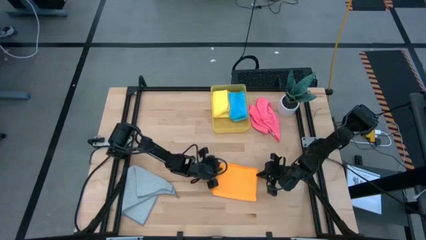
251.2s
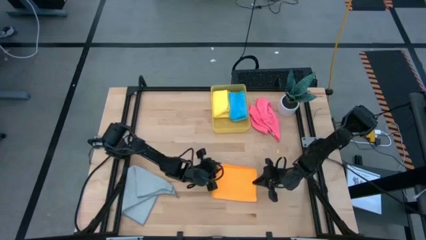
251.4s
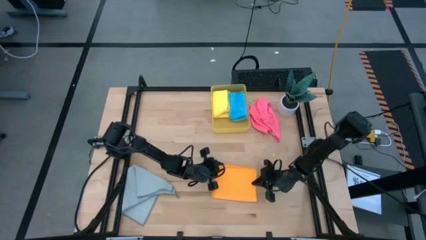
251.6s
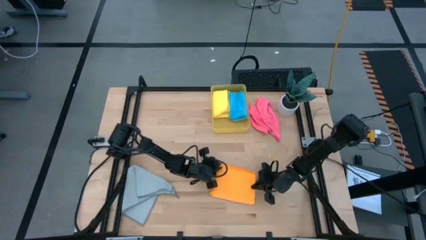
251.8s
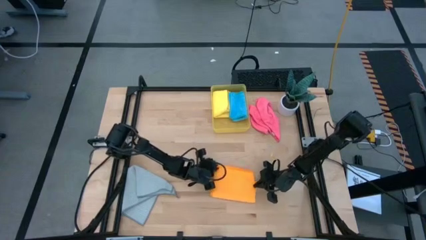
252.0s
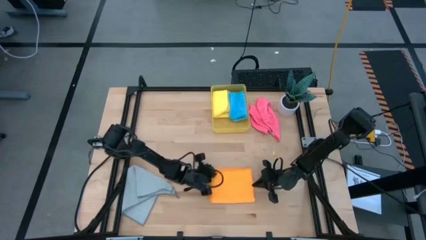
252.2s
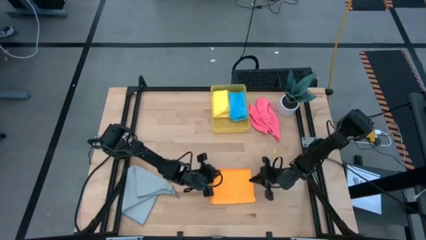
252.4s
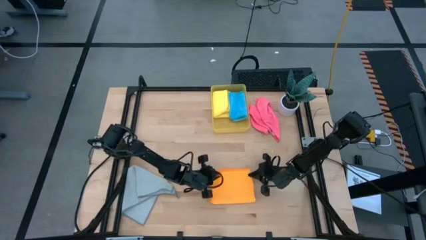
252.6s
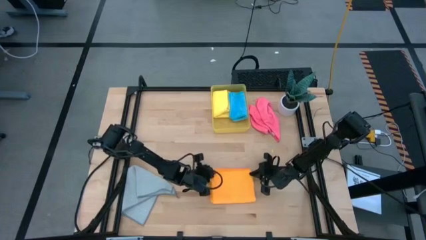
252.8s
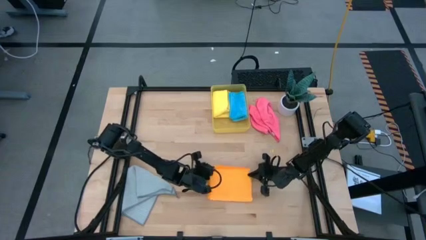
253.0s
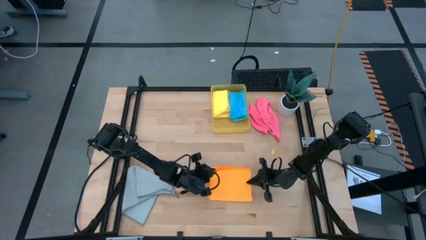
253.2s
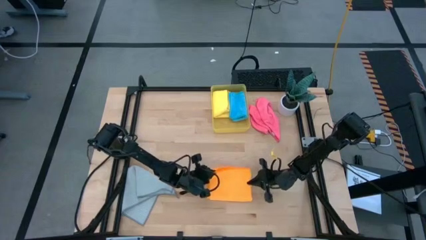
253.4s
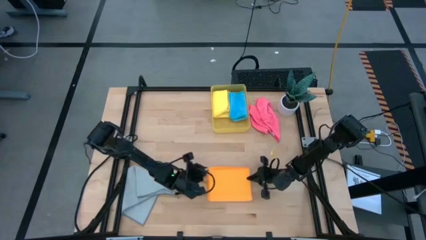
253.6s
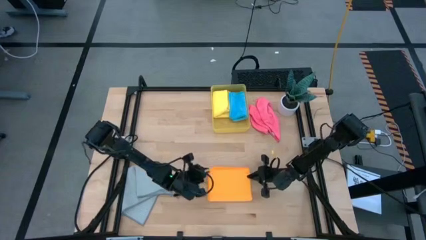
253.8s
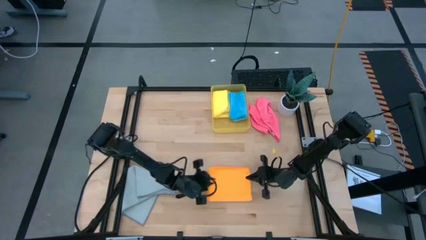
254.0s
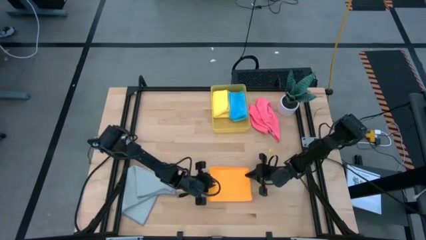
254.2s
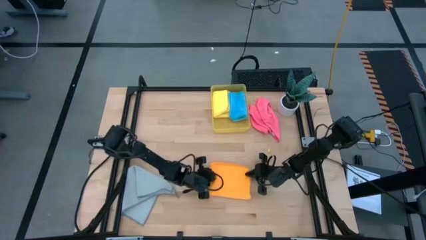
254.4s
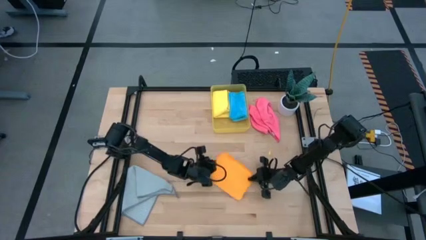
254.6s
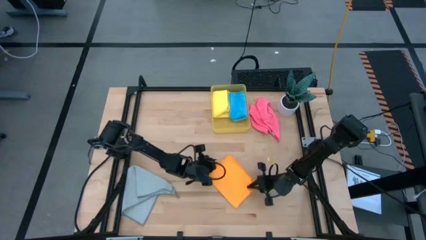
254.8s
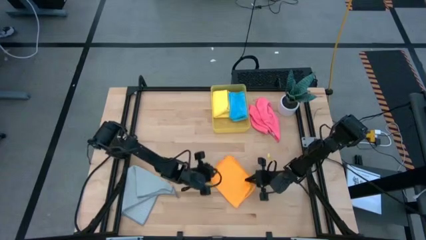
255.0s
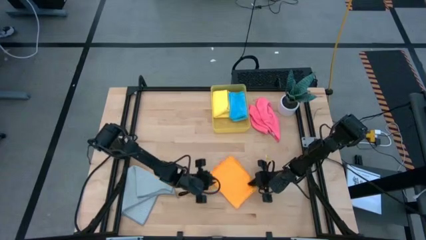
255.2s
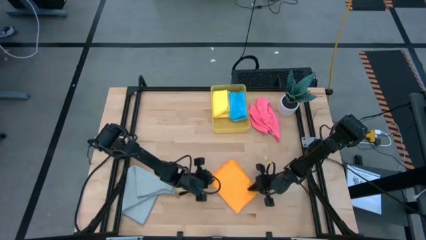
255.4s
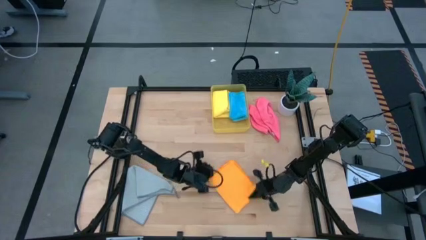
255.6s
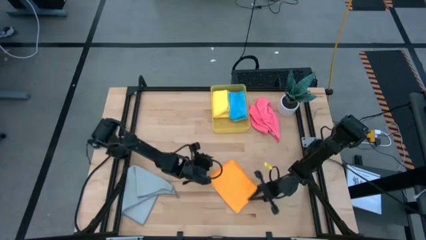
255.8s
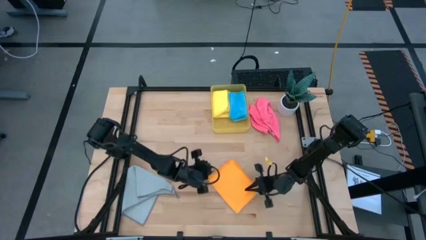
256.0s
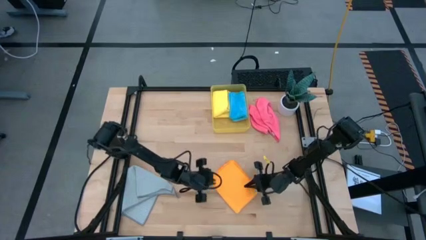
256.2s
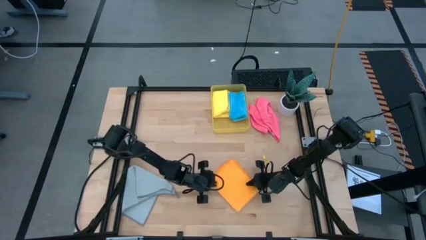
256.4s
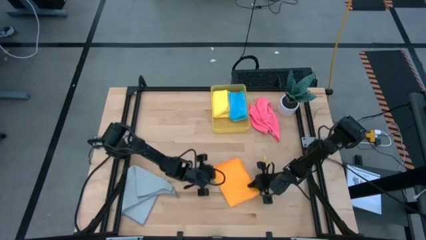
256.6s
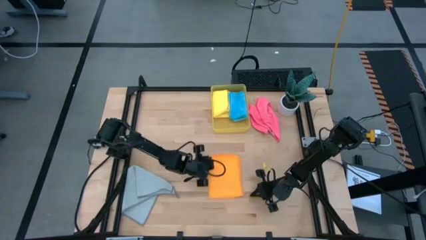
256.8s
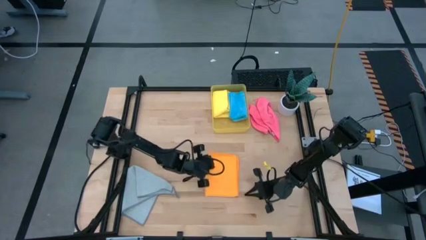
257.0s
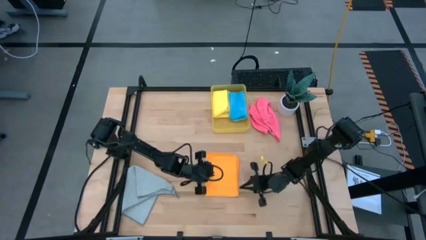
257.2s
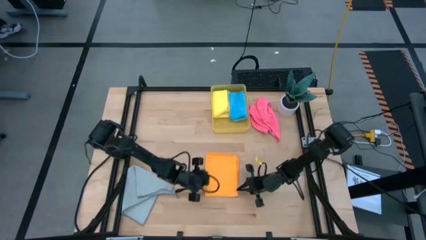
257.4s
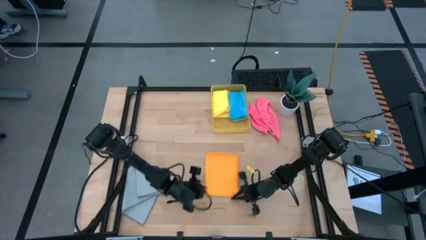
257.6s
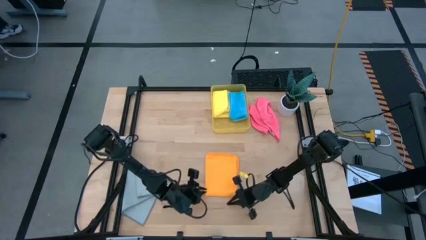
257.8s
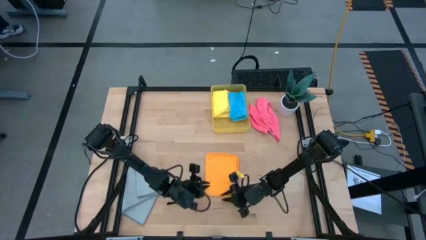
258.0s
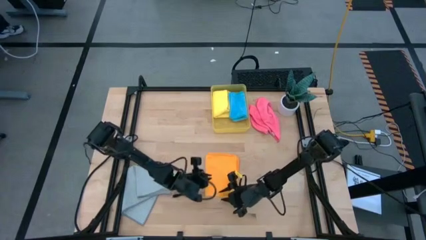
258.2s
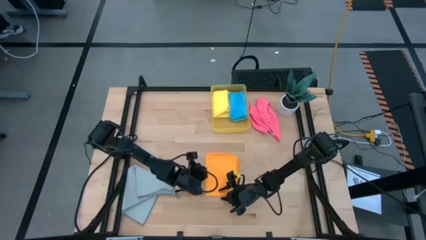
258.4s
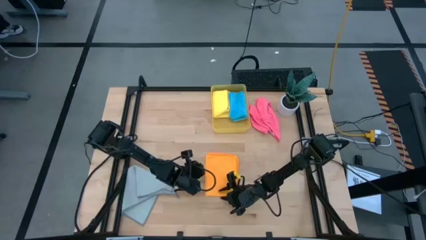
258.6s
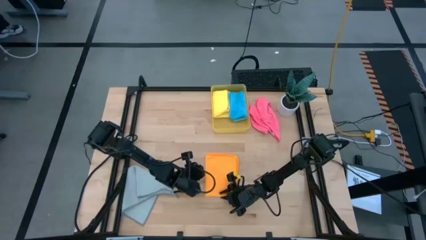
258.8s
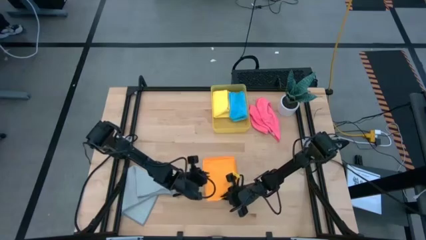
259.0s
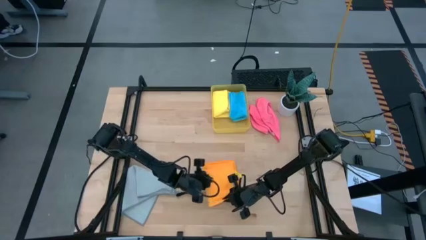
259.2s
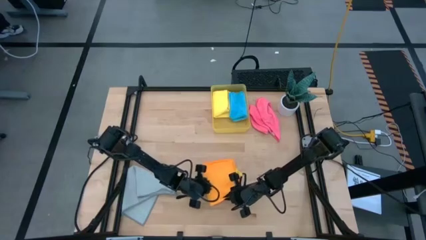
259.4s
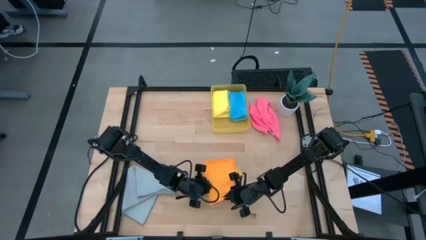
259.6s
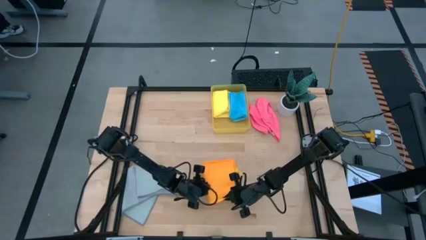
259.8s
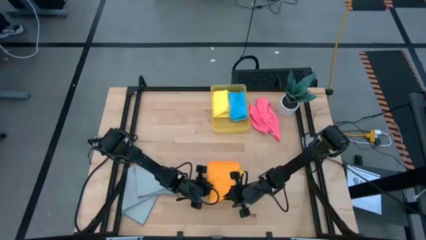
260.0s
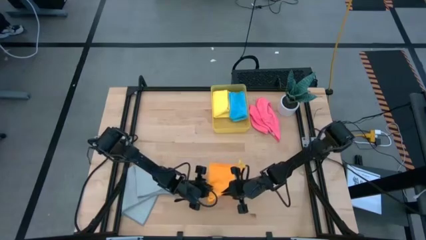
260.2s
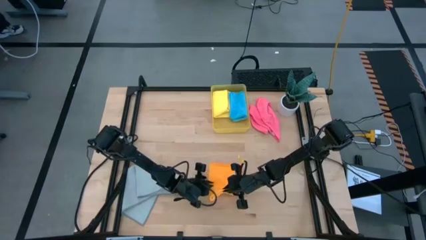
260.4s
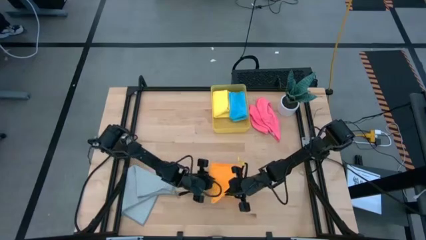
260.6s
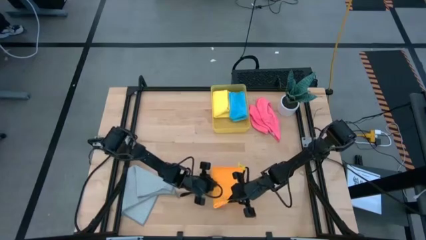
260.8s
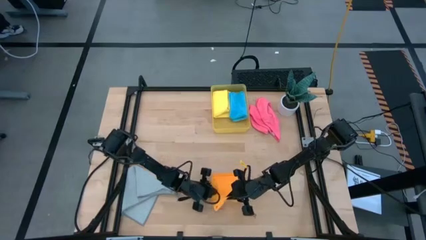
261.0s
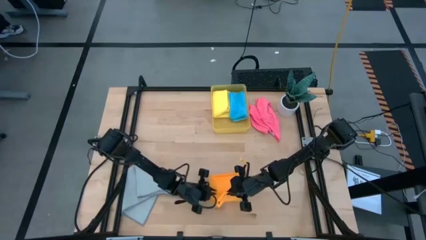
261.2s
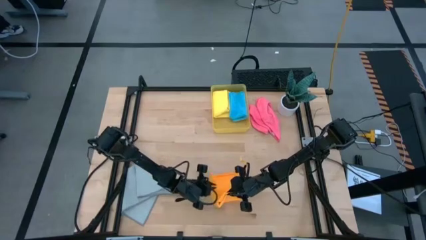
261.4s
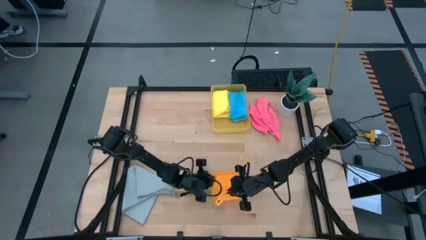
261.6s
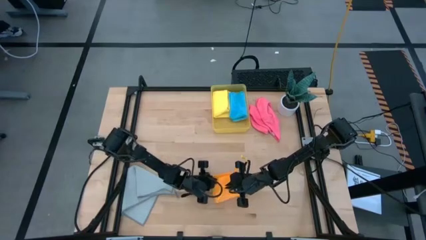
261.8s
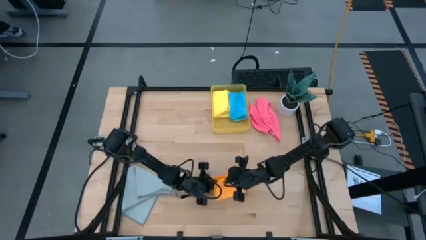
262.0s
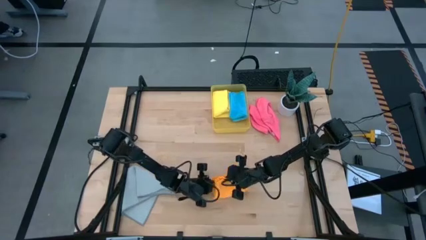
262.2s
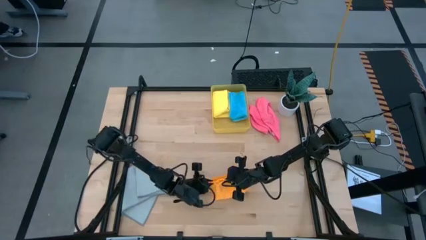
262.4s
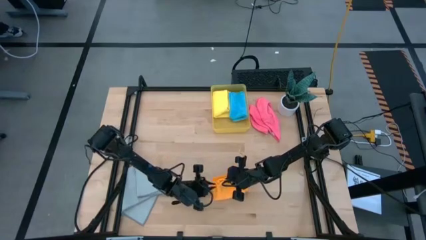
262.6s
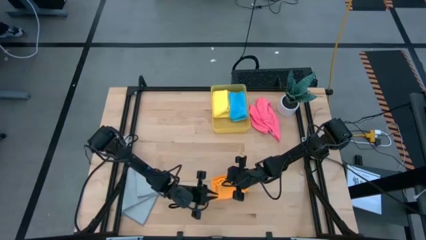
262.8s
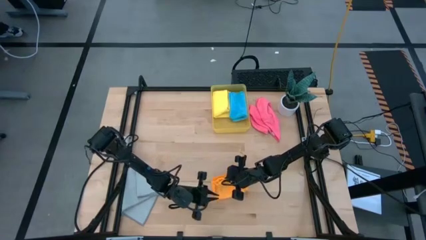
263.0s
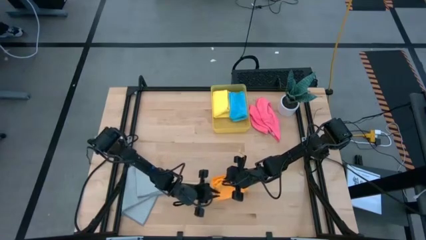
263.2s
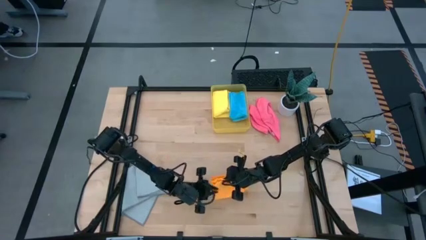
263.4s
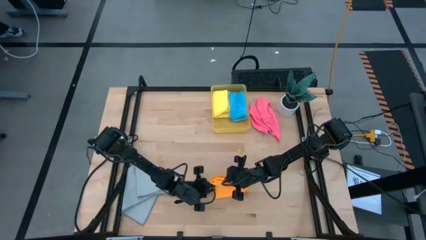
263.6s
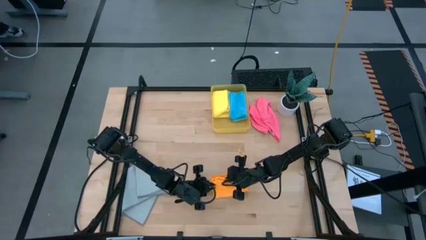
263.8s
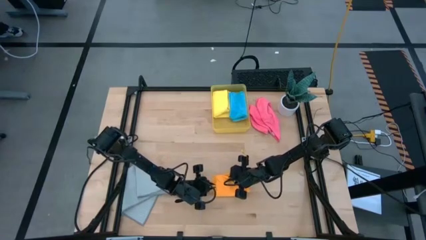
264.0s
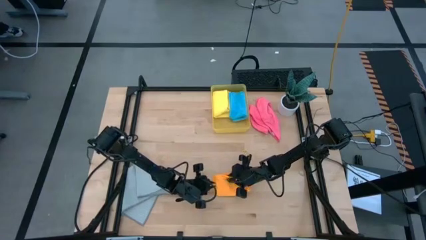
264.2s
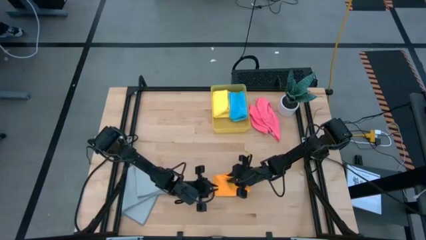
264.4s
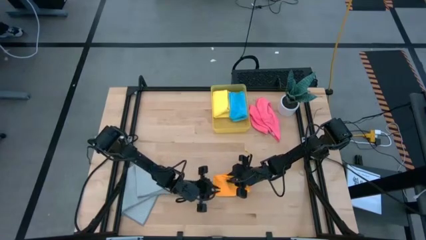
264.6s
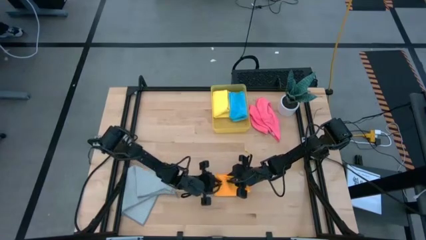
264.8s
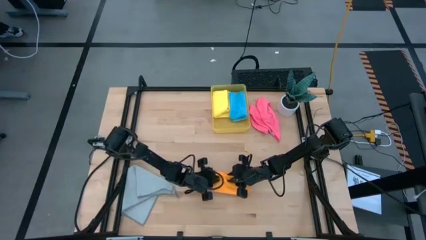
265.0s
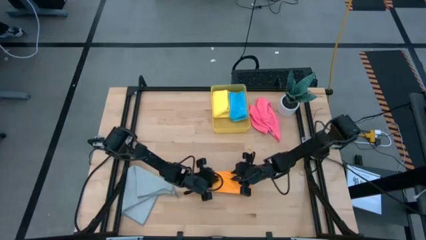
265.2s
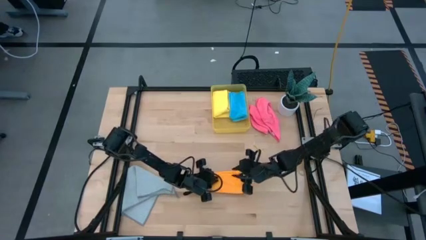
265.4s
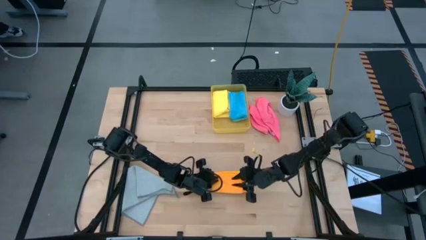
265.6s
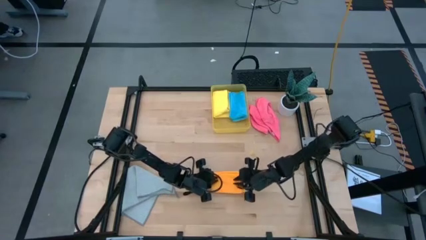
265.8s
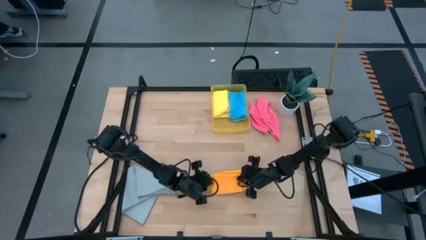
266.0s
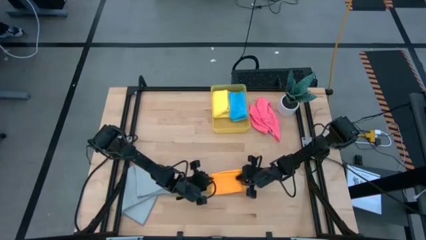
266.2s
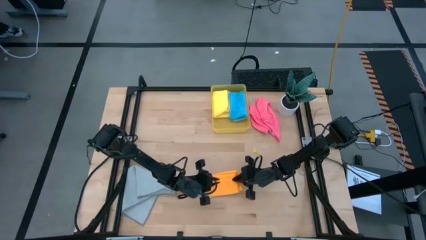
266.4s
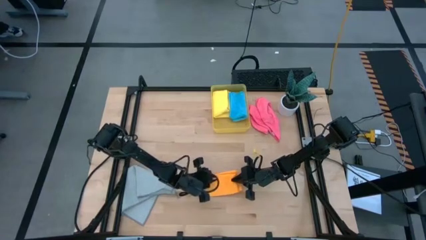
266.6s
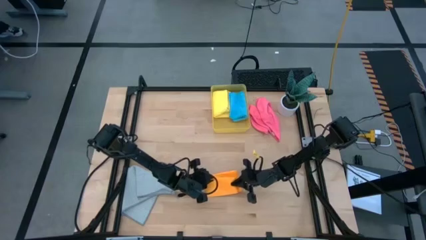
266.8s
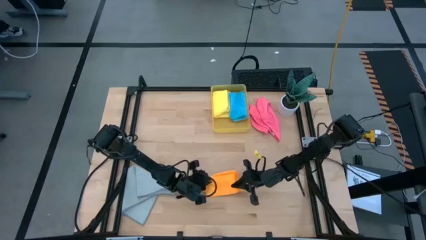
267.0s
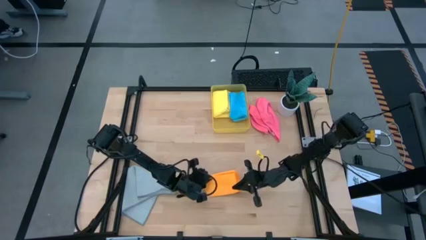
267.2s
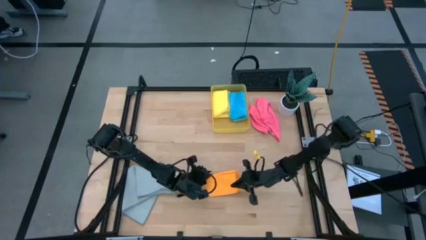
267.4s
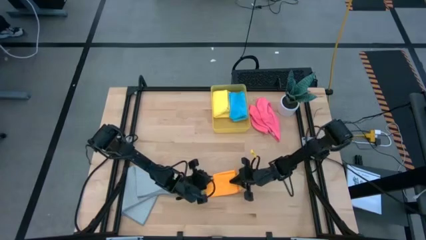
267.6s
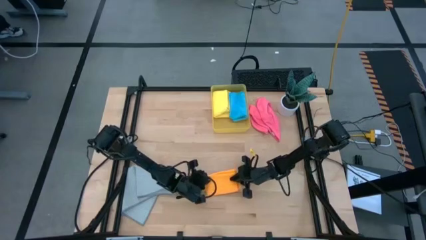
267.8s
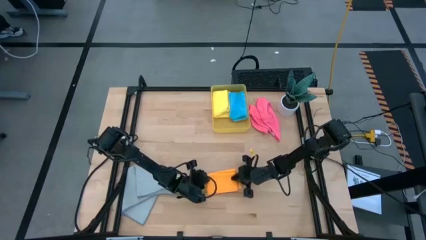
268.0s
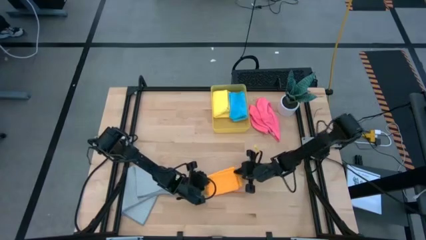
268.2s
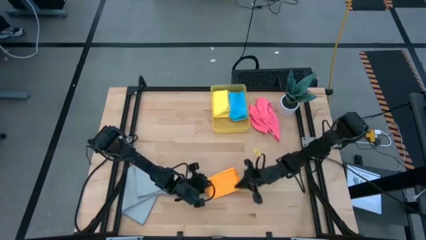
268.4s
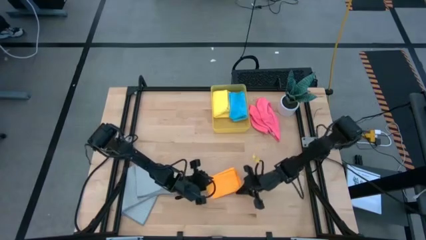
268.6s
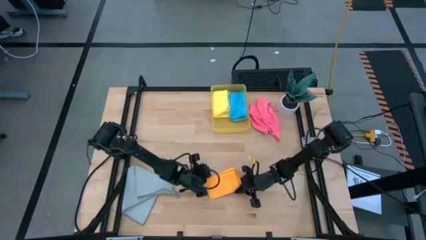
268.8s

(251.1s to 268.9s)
Task: Fold microfiber towels
Fold the orange microfiber towel
